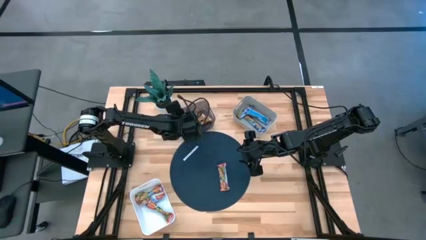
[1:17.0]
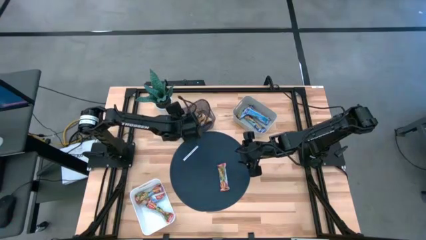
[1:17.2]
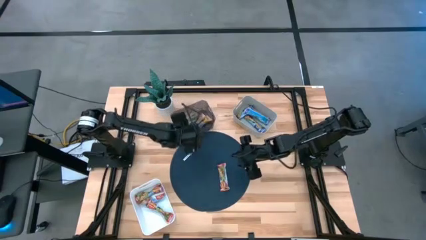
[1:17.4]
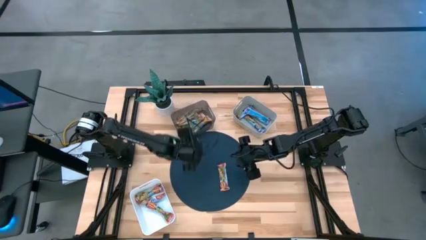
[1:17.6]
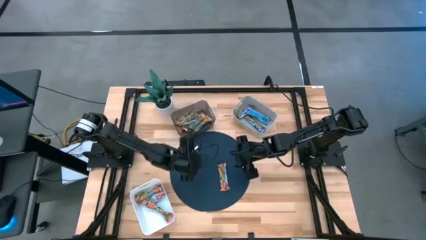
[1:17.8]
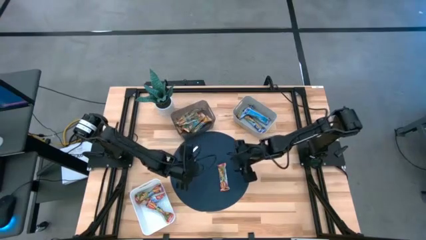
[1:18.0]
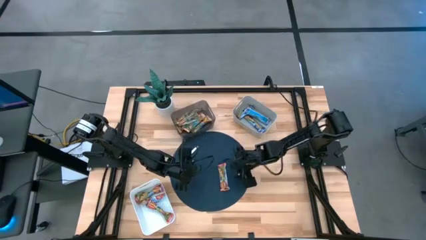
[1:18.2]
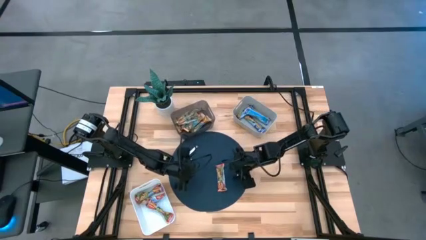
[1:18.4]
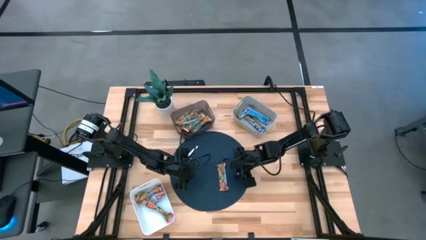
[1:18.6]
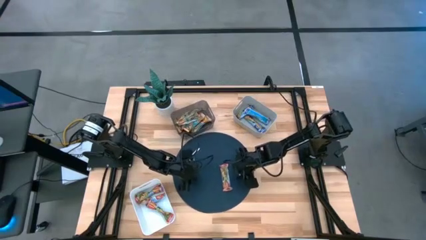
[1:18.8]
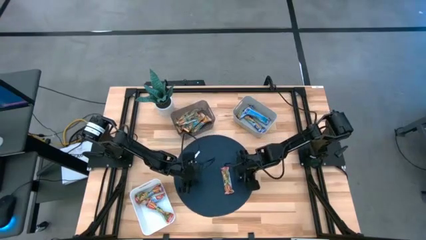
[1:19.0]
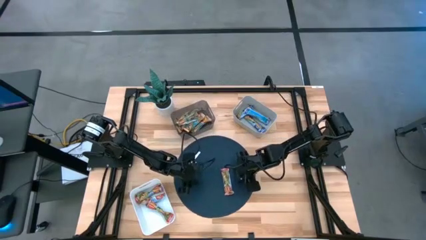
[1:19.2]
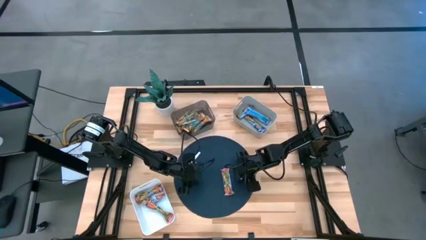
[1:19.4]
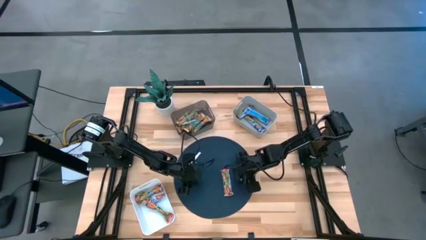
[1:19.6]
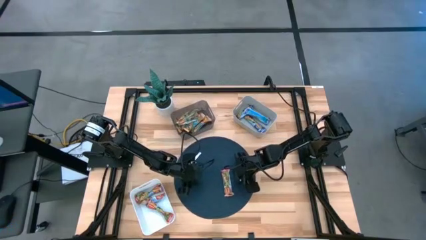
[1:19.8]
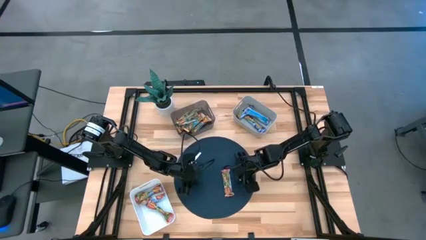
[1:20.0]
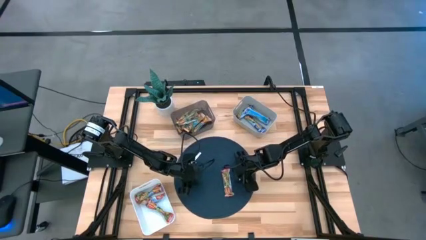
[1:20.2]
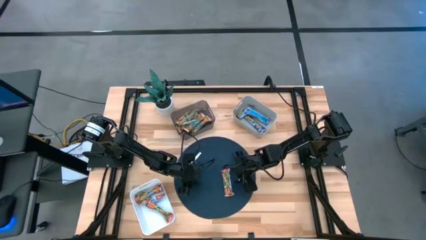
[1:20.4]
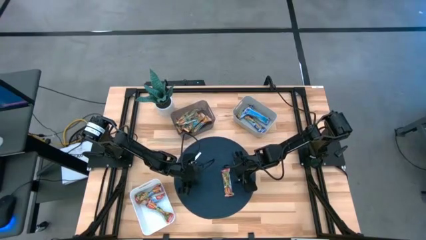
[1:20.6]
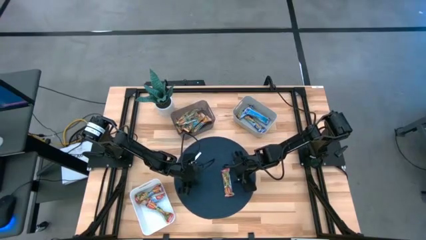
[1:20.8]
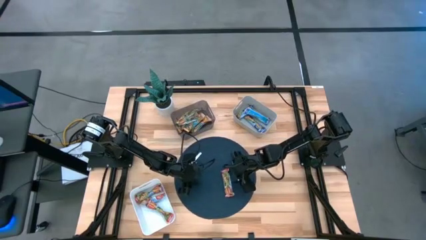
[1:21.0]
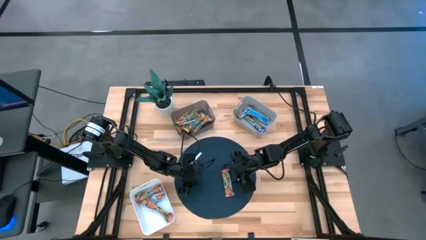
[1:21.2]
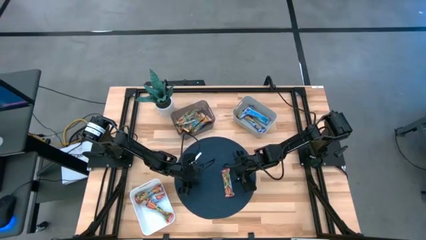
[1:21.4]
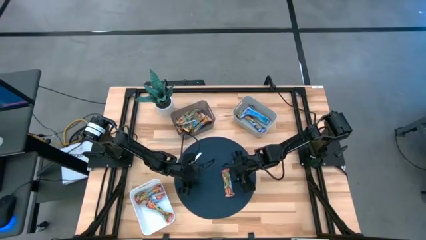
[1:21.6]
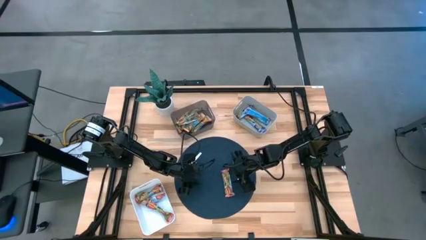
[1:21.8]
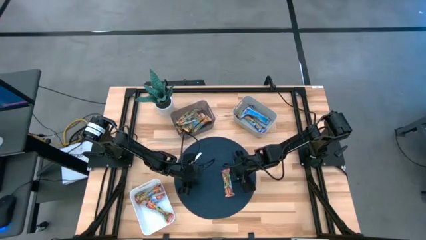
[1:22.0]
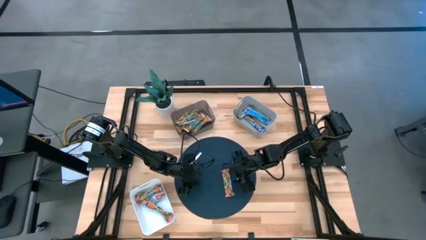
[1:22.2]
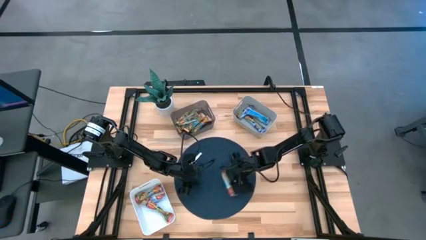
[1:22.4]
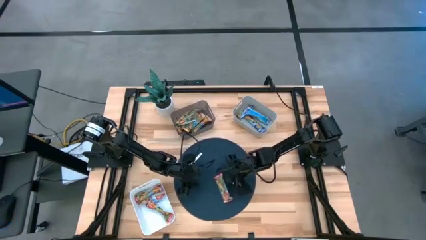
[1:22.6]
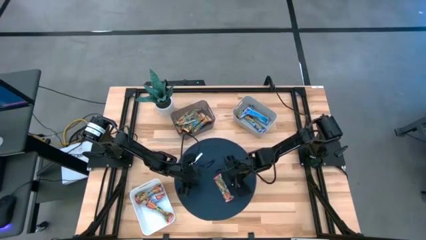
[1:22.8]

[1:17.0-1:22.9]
Task: Pick and place Granola Bars by type
Put the red granola bar into the white bin

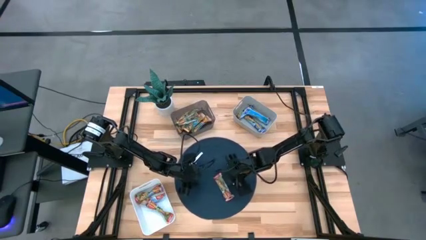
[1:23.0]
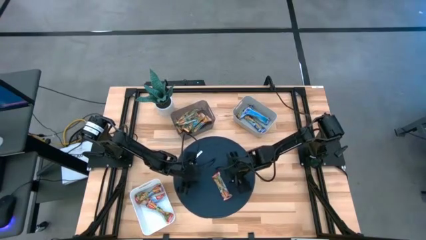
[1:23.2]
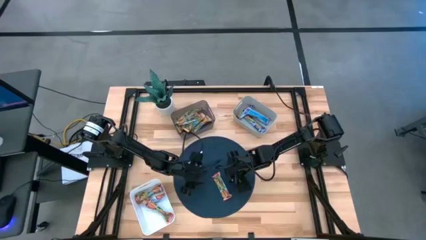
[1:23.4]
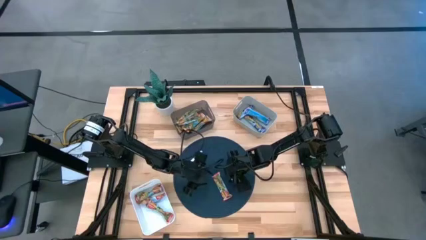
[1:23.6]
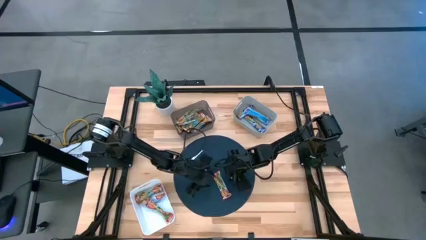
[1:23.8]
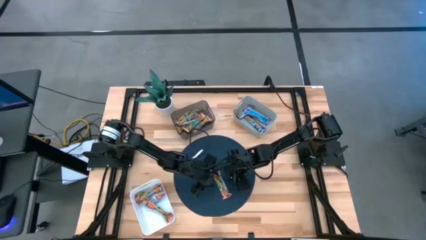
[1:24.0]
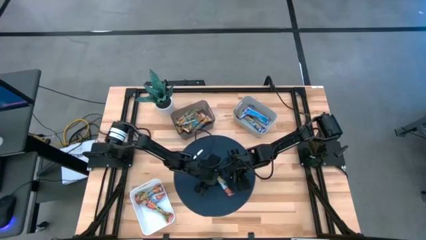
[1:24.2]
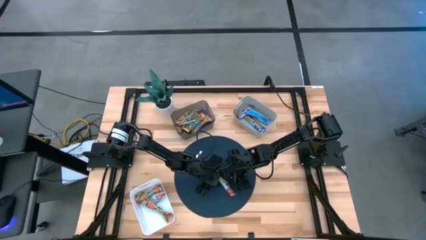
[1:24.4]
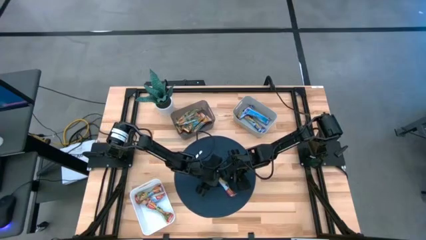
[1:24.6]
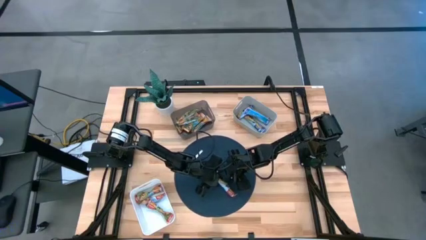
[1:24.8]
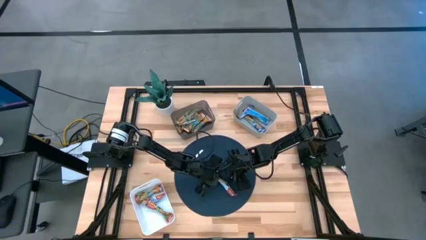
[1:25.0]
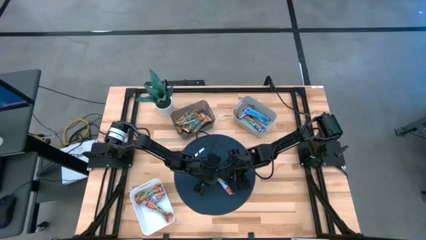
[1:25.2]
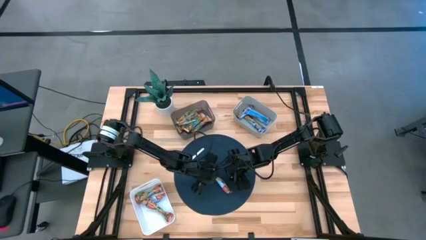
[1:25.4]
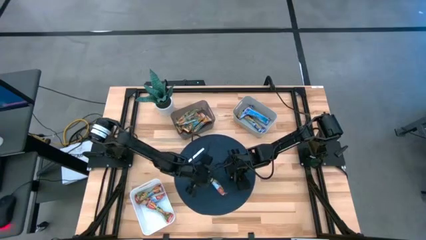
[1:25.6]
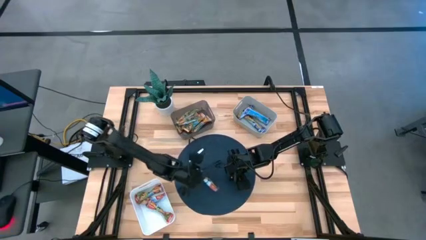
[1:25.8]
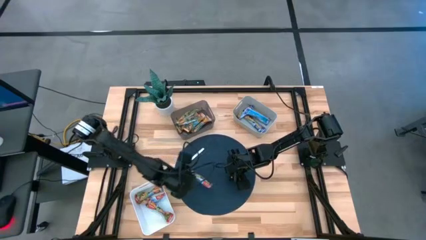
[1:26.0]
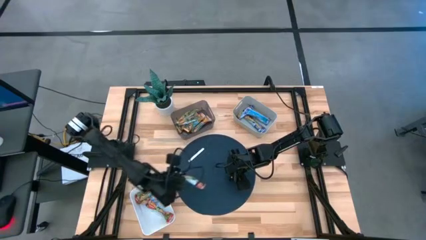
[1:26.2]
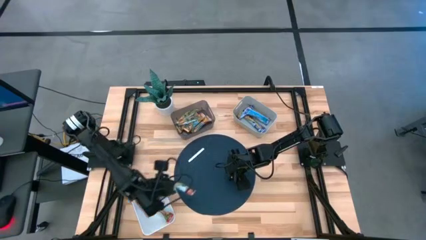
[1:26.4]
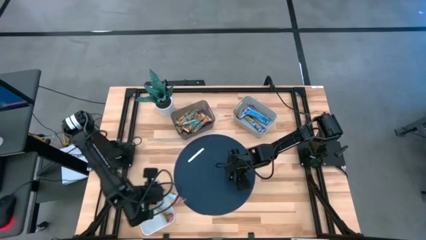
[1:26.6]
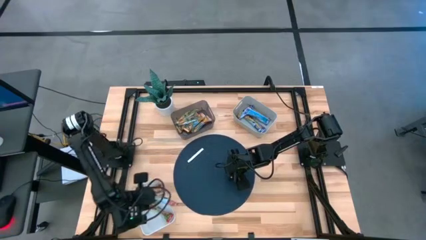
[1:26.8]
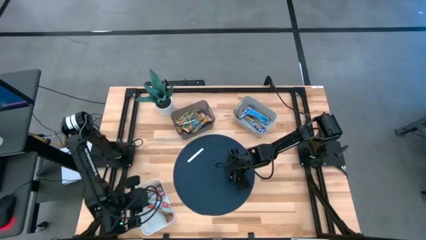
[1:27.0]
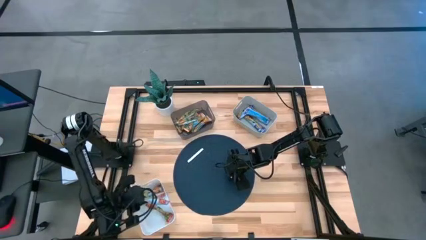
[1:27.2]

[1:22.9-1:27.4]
Put the red granola bar into the white bin

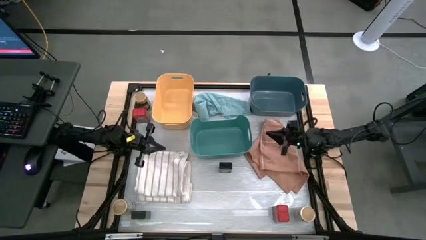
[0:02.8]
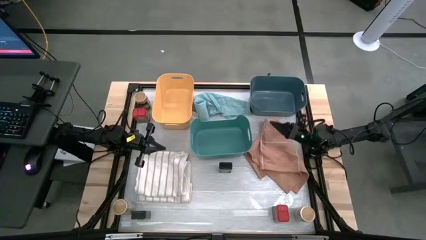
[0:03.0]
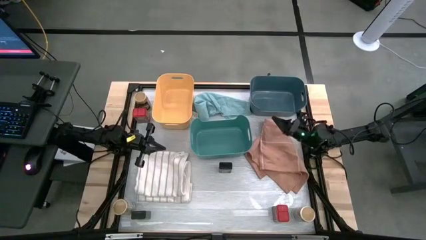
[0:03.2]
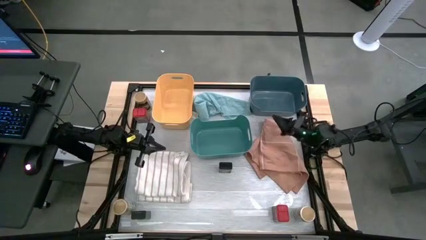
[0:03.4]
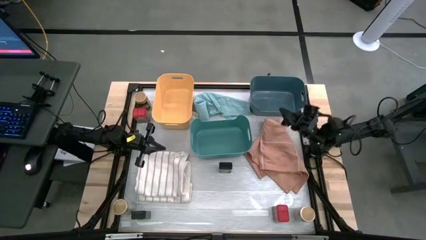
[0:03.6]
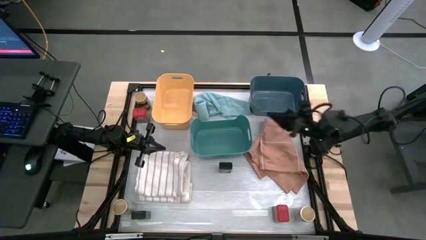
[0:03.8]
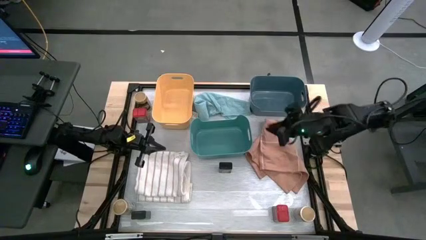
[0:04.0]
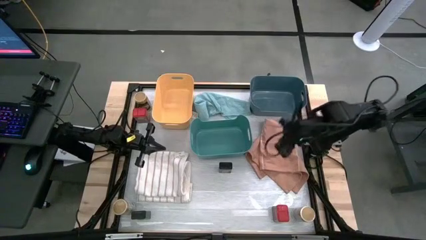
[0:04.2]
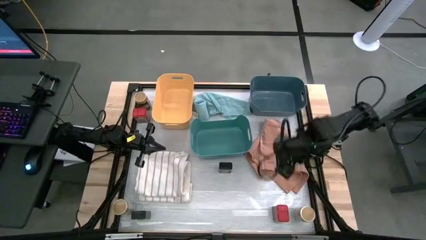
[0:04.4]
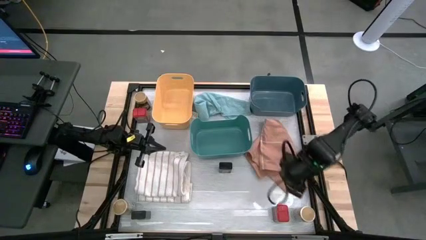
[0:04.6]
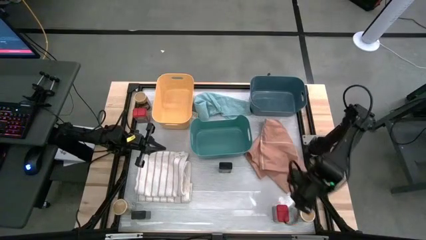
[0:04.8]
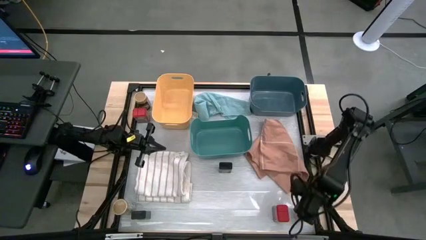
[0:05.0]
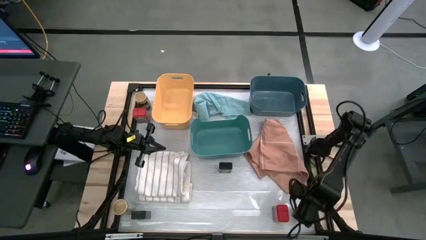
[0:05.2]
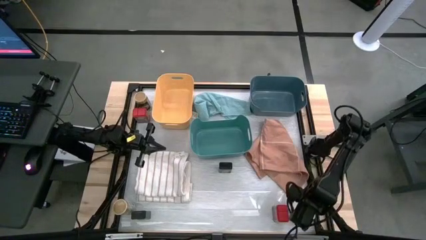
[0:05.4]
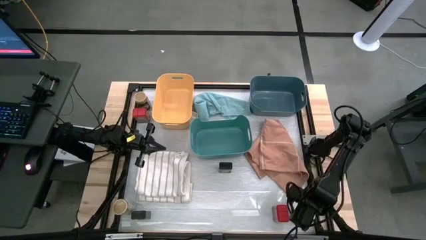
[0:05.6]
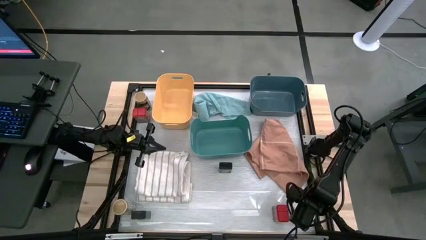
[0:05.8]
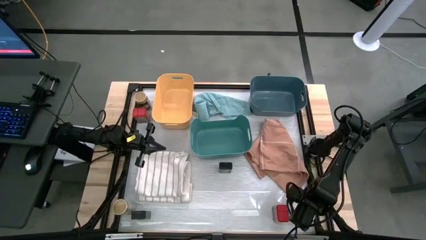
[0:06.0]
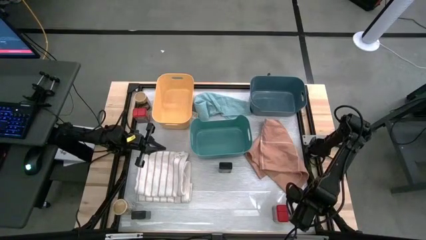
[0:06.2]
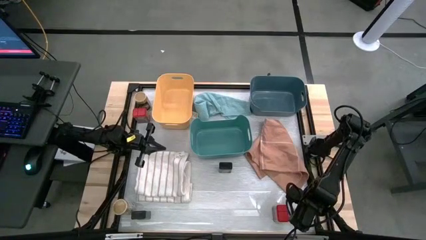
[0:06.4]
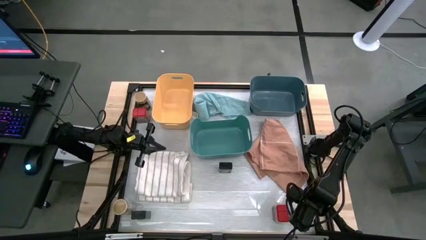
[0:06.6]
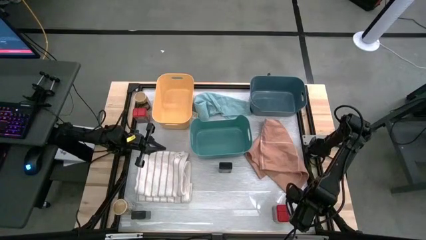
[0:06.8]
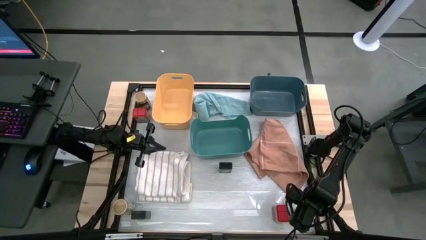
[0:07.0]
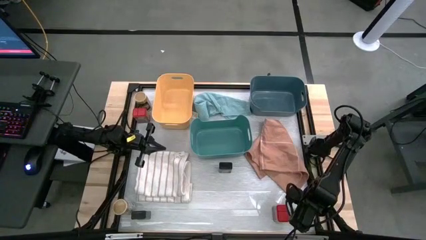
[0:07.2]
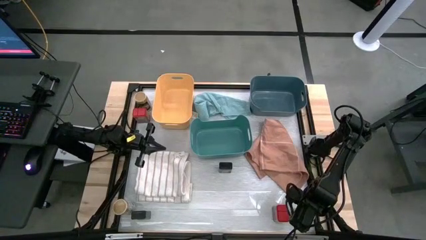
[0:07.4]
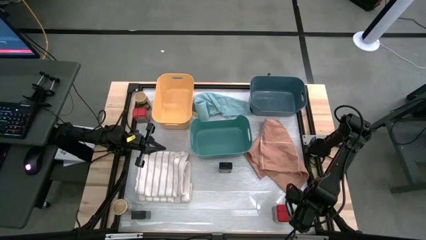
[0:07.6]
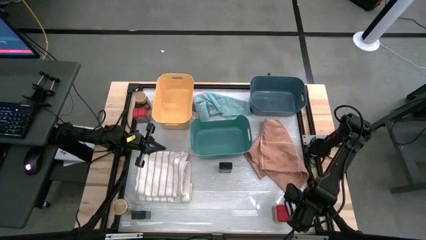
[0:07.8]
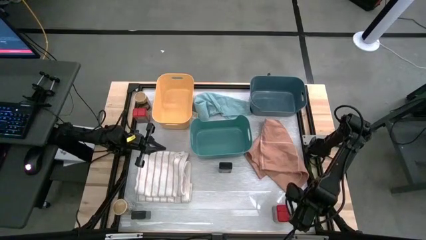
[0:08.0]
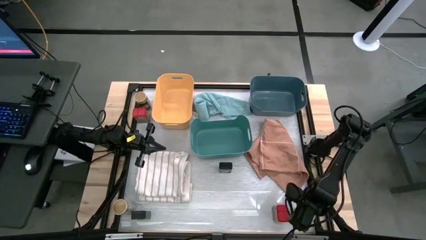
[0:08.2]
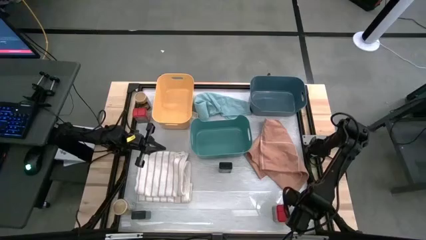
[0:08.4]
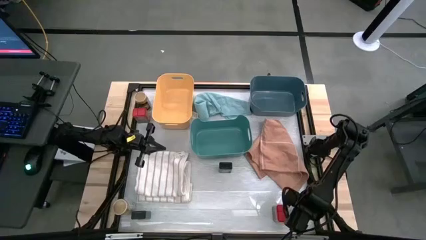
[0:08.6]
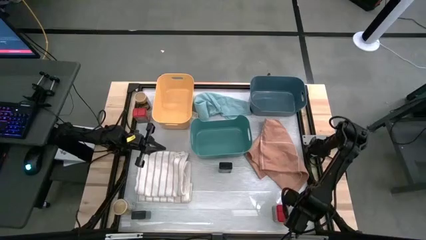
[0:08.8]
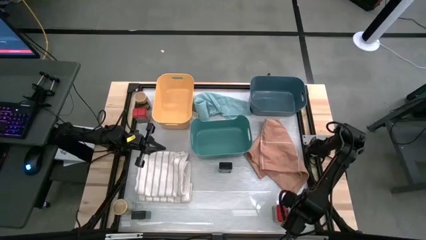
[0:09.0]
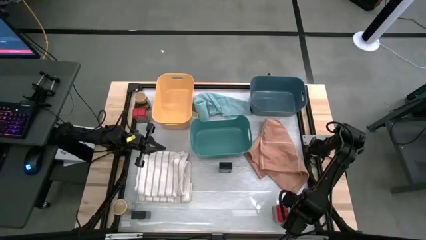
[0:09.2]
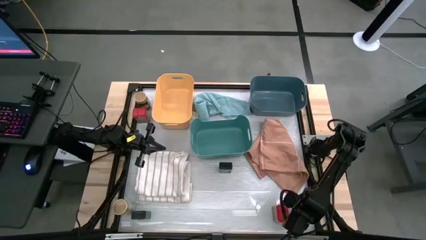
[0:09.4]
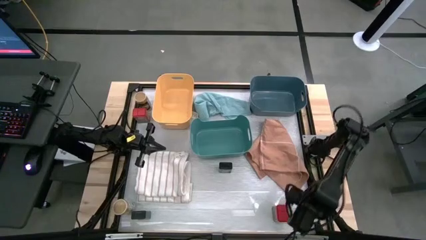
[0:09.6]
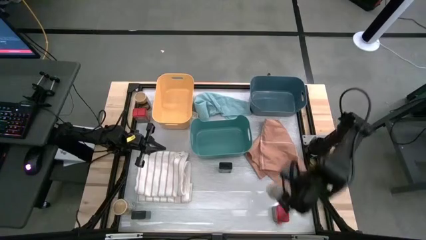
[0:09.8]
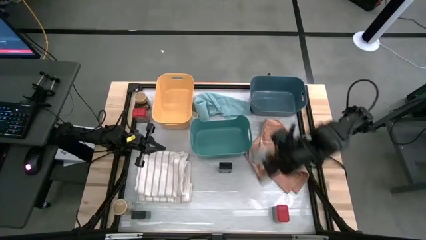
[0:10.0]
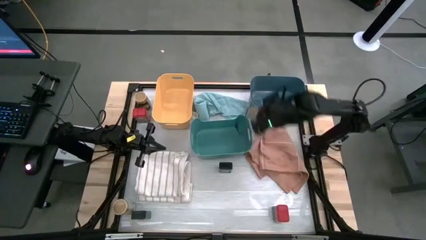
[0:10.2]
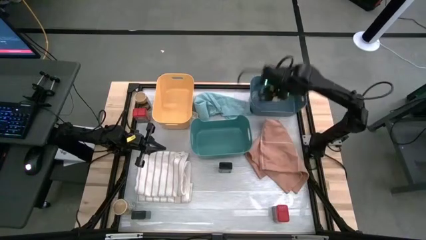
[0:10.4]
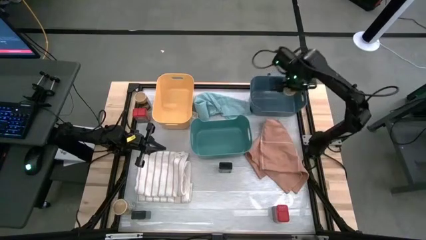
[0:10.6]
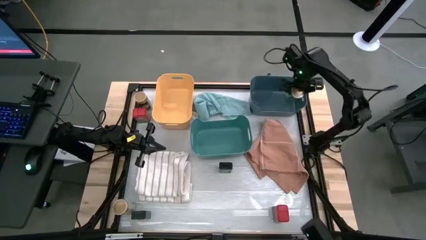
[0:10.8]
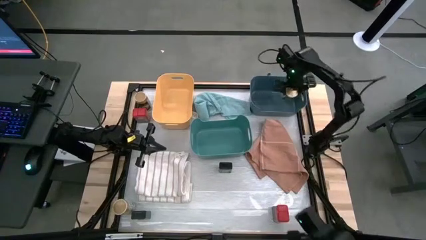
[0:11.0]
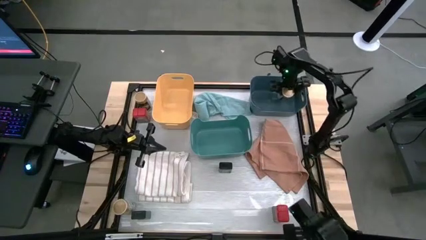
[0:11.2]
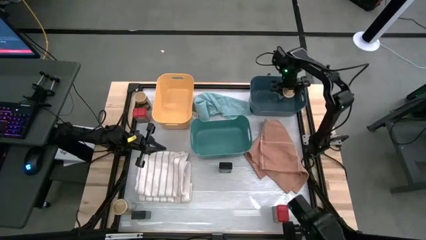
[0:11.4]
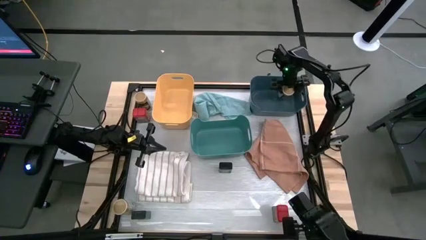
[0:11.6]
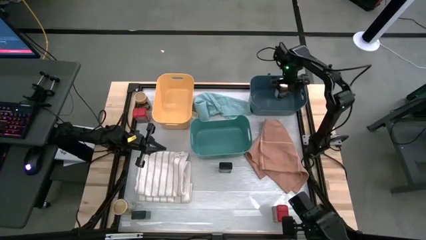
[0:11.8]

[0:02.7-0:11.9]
Task: Sort spices by type
Put the bottom right gold seasoning bottle into the blue bin
